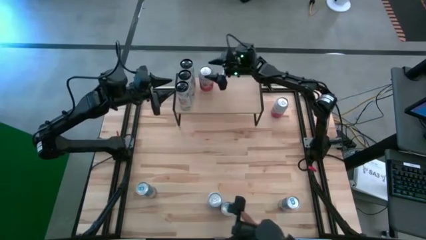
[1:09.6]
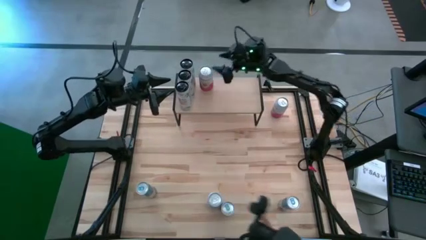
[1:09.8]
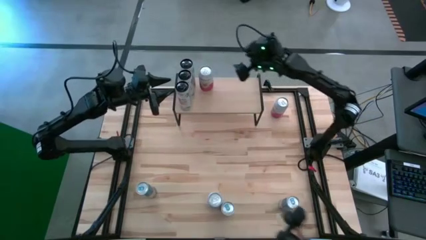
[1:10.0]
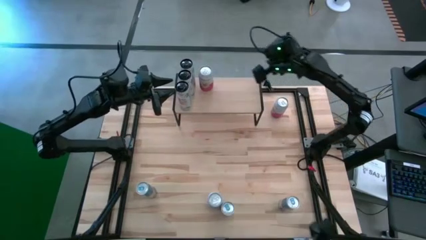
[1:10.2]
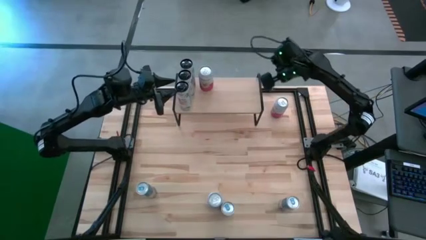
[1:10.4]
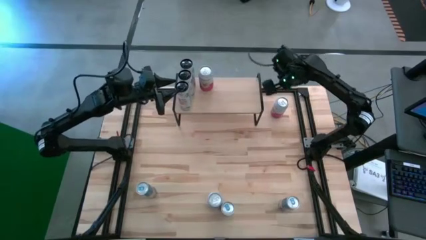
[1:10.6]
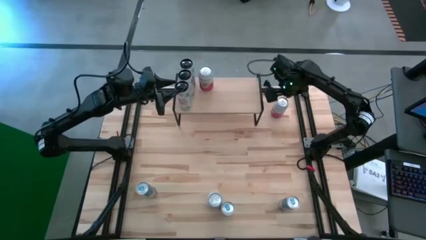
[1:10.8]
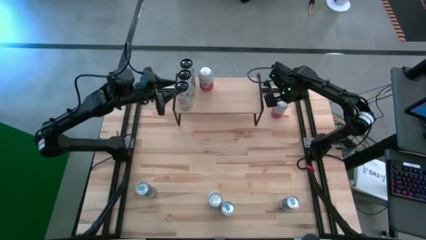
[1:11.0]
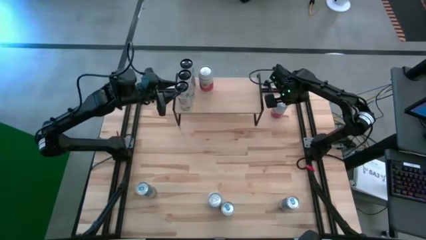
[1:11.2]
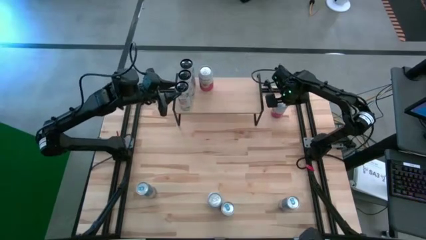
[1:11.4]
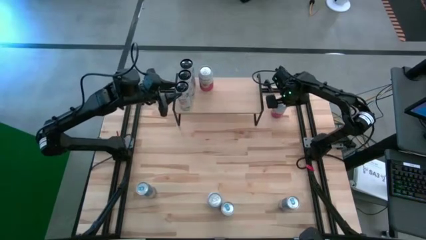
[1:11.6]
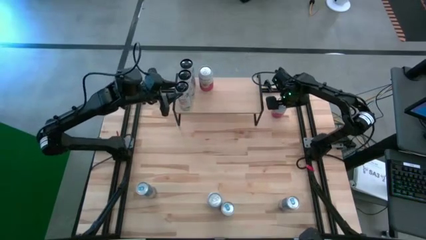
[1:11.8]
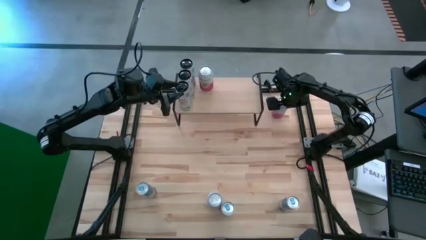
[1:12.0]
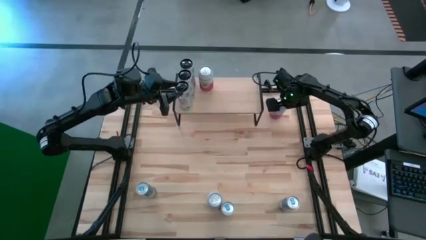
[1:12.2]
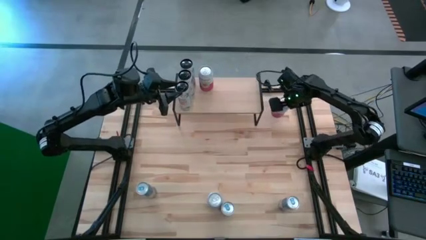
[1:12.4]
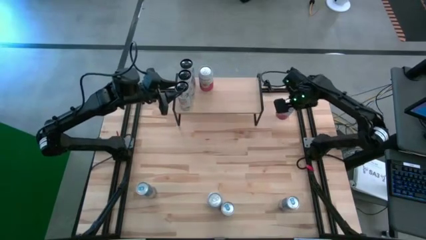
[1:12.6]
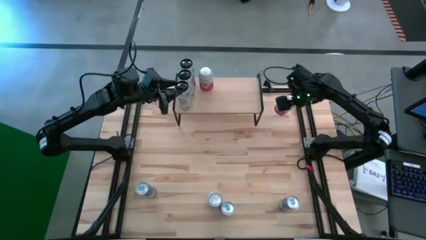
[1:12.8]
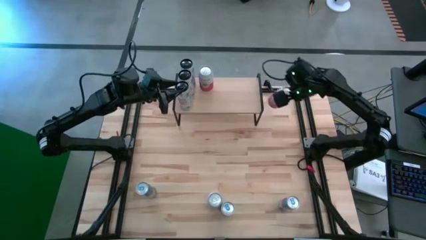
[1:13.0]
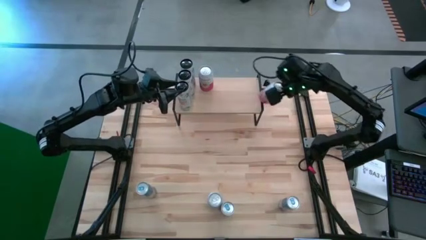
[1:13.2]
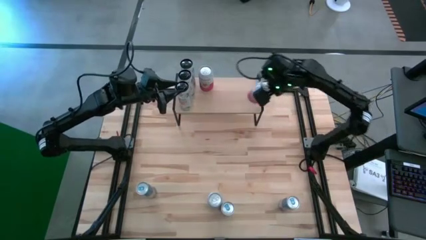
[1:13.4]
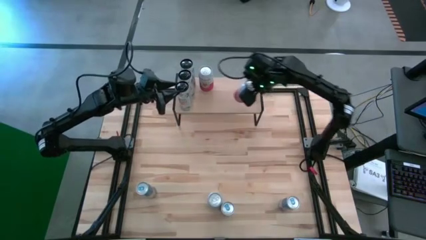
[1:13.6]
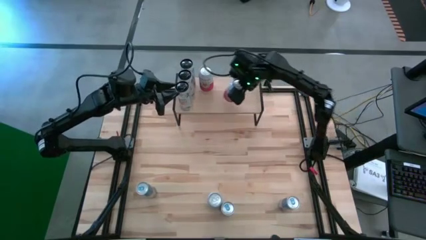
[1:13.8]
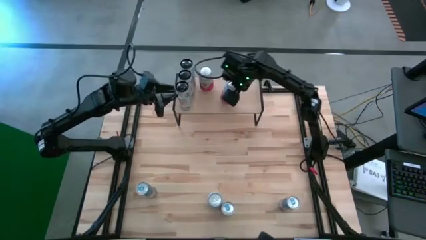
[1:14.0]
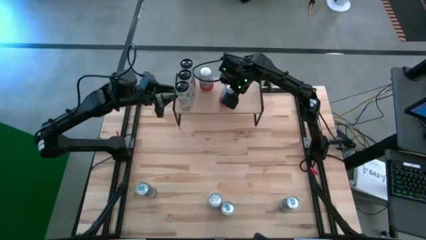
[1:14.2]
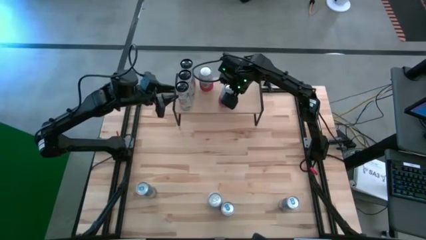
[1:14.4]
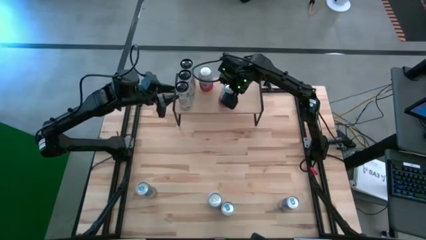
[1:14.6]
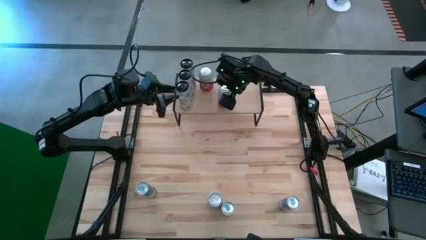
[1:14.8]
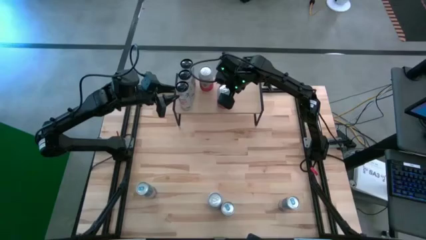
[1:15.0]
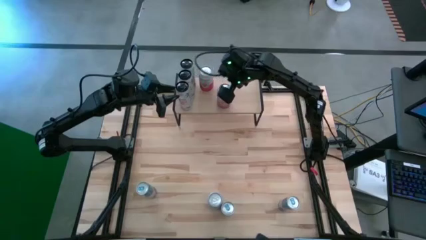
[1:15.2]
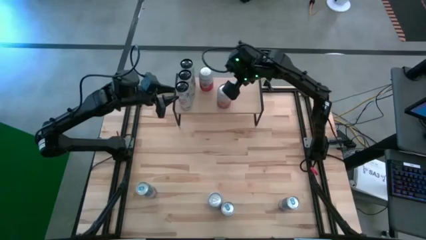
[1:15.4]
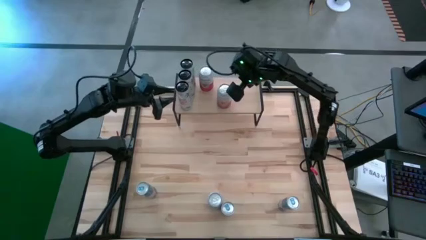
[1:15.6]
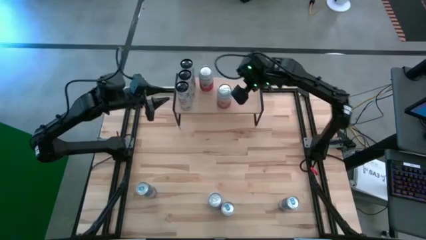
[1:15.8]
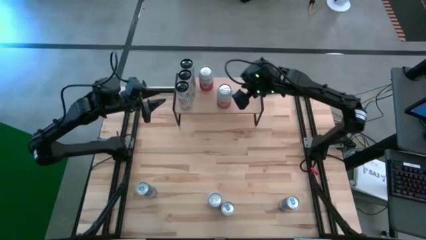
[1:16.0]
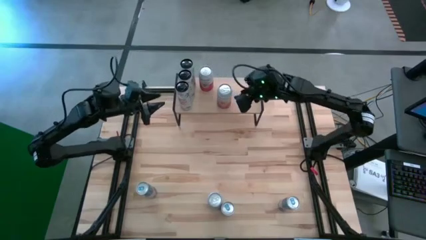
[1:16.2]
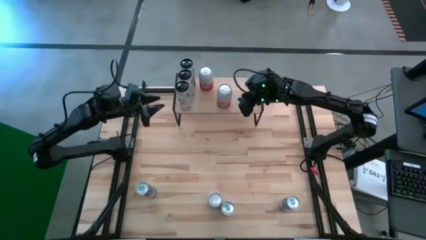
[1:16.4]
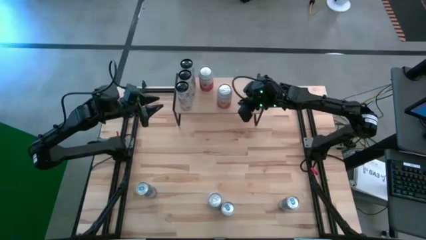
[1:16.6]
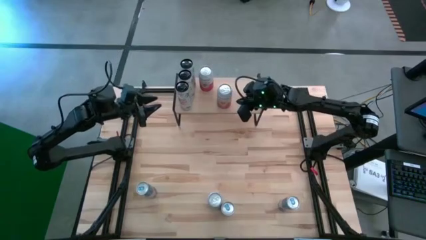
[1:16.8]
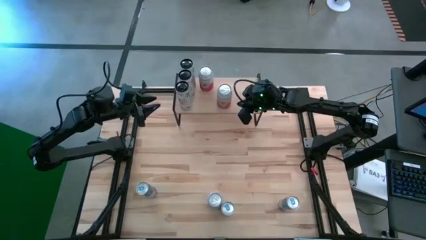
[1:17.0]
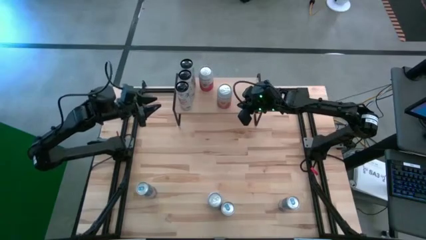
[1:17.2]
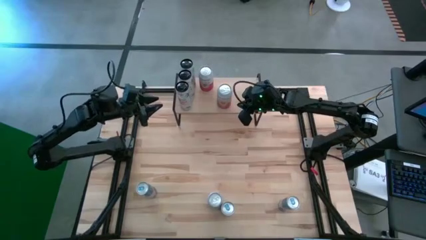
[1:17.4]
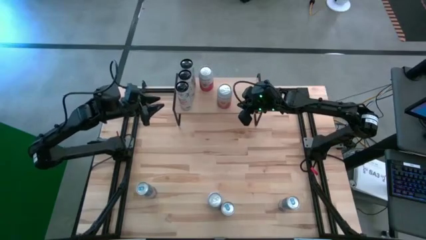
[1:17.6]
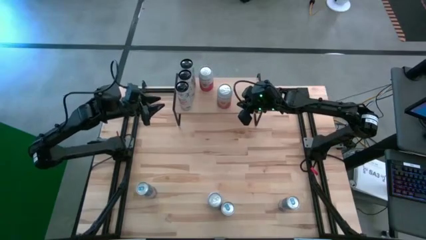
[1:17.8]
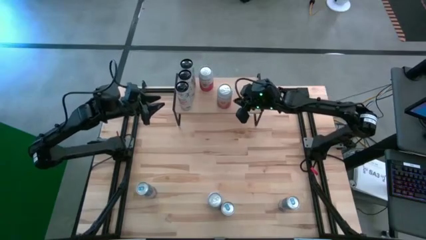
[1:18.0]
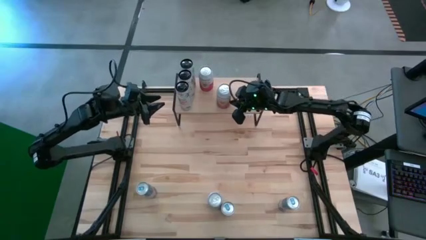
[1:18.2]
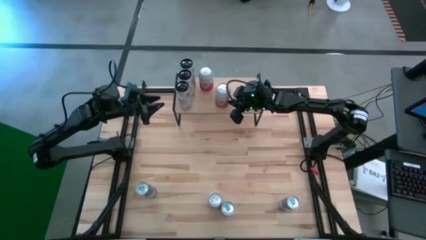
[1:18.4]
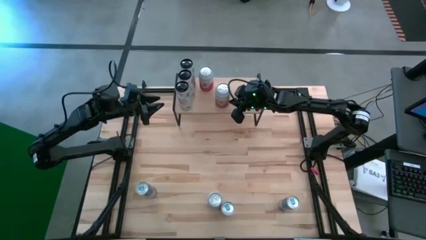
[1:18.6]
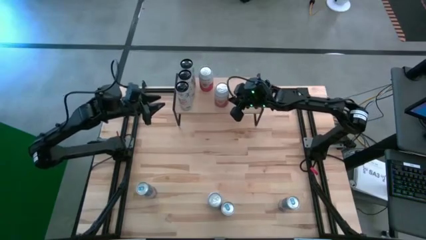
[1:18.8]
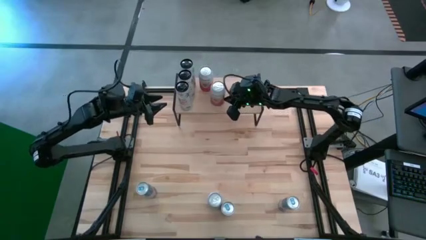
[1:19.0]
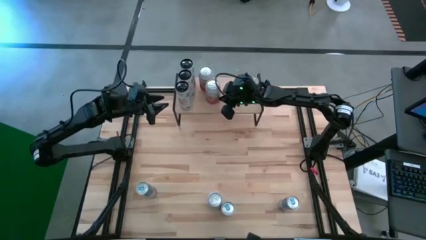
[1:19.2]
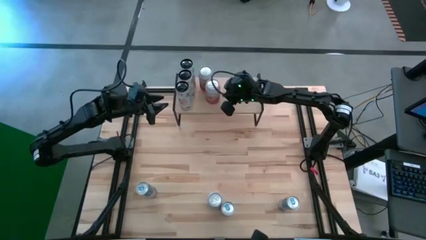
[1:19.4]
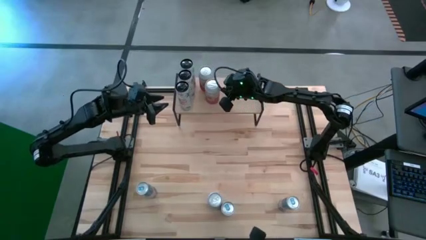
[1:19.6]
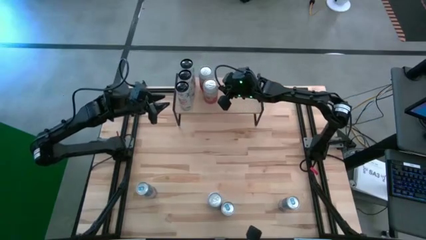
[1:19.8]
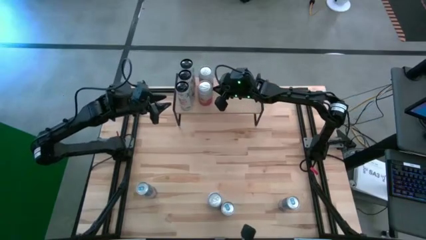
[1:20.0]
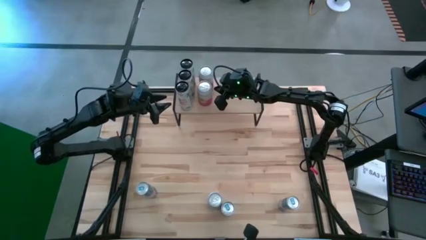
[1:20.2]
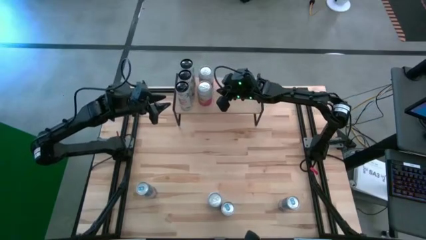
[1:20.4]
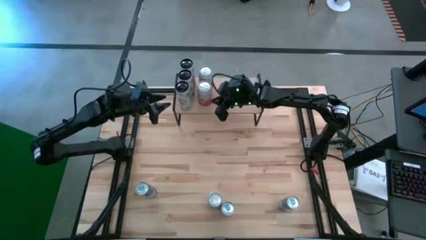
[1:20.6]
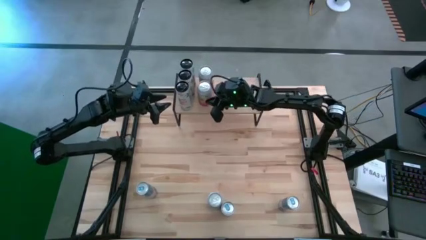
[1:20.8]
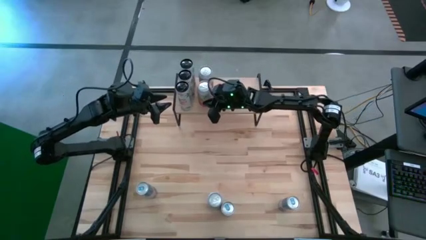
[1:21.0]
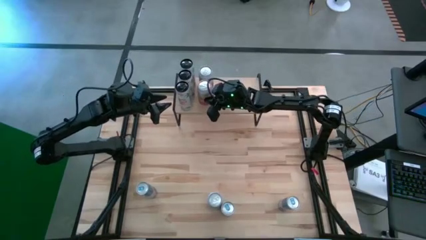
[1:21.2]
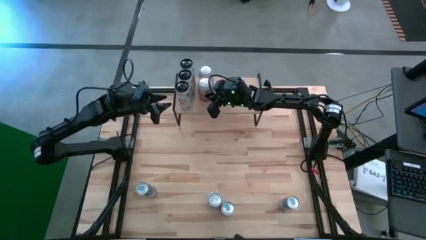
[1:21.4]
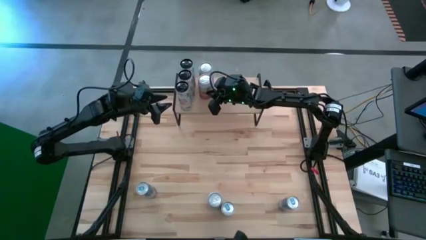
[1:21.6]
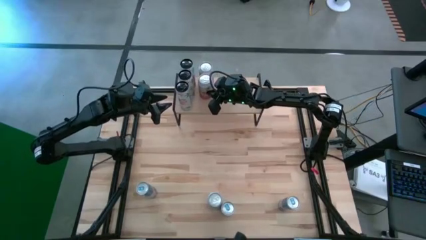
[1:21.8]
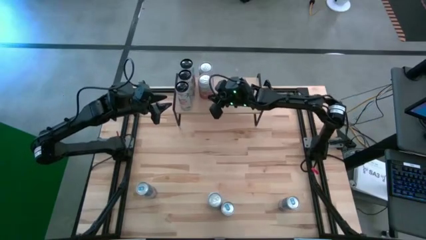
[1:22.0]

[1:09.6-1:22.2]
Task: Place canned beverage on shelf
Put the top pink-white soda can on the shelf aligned with the other pink-white soda can
